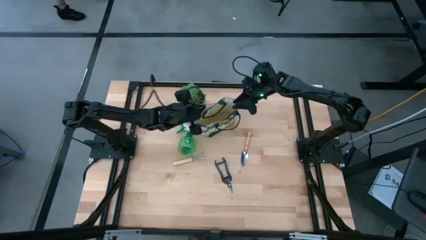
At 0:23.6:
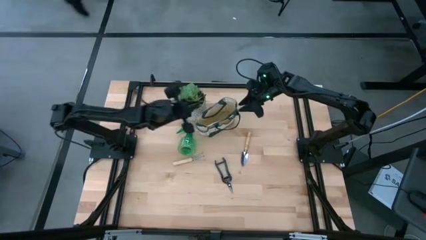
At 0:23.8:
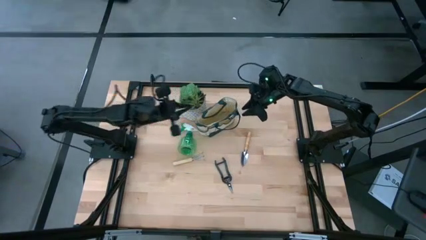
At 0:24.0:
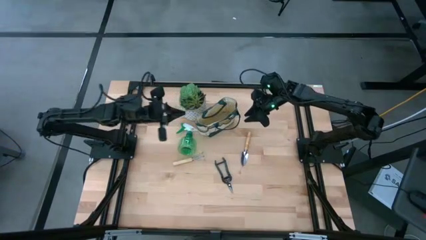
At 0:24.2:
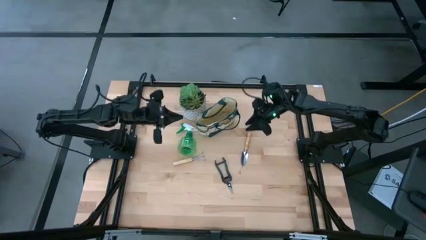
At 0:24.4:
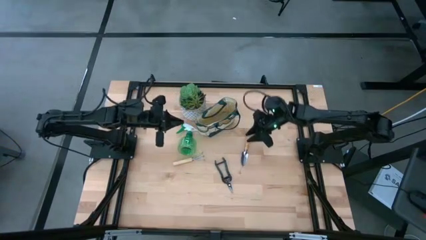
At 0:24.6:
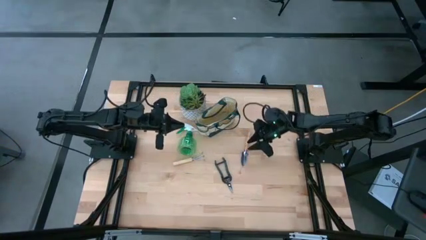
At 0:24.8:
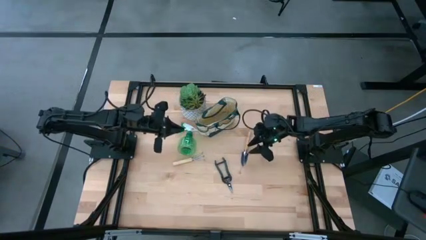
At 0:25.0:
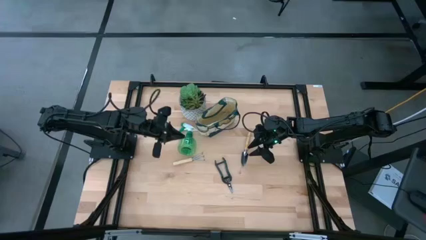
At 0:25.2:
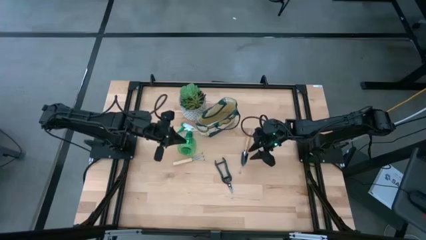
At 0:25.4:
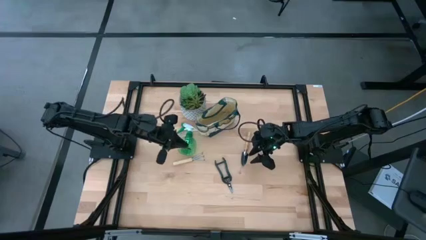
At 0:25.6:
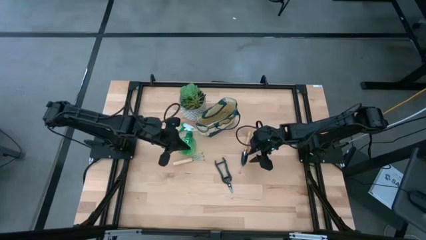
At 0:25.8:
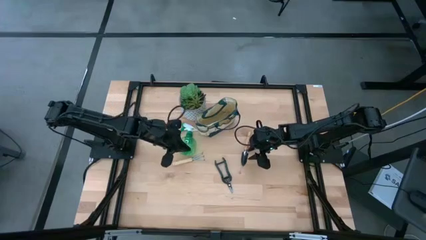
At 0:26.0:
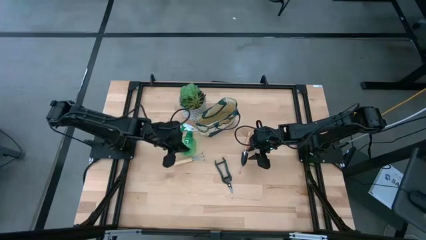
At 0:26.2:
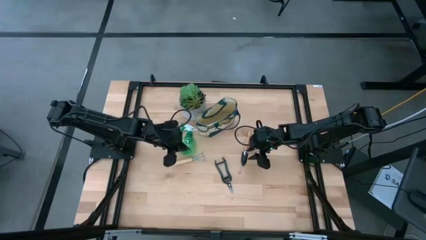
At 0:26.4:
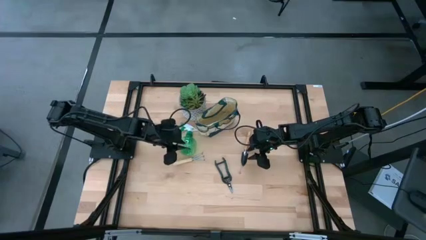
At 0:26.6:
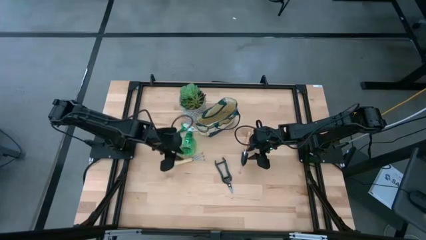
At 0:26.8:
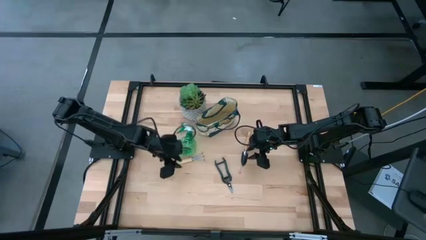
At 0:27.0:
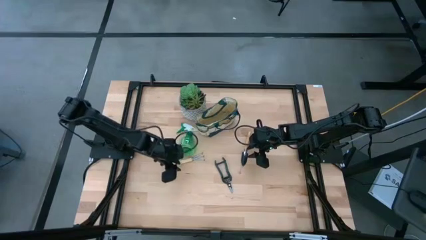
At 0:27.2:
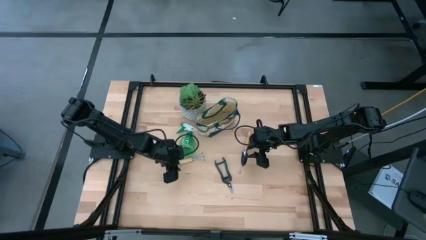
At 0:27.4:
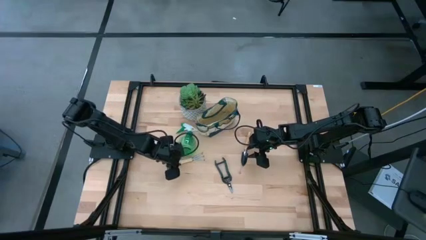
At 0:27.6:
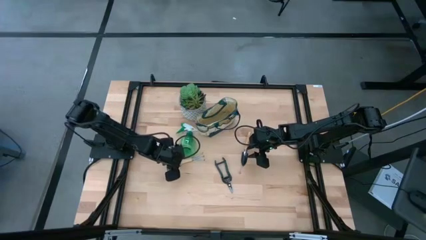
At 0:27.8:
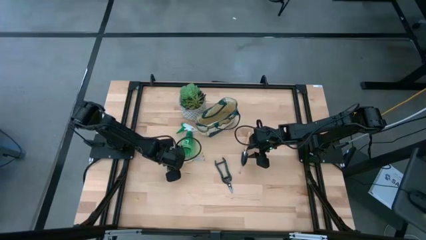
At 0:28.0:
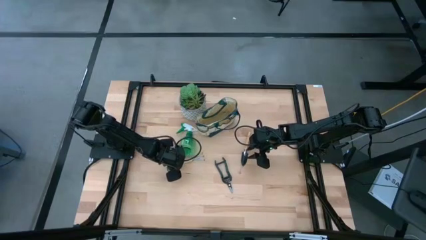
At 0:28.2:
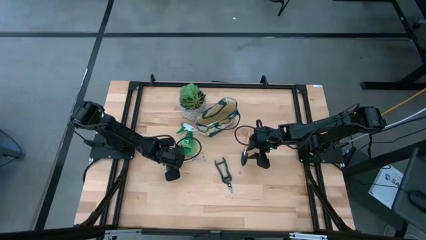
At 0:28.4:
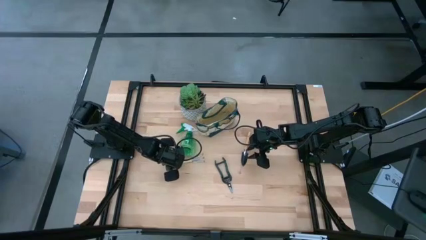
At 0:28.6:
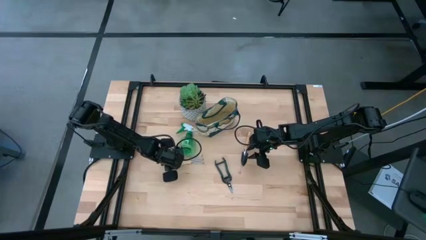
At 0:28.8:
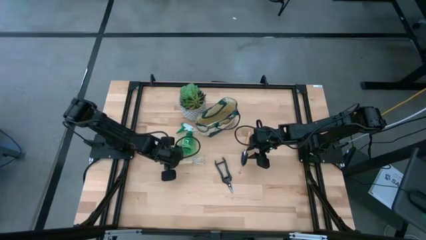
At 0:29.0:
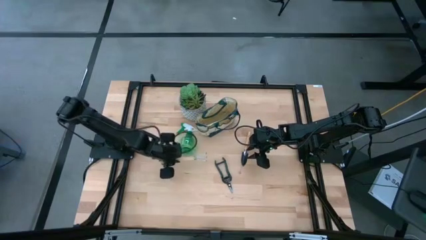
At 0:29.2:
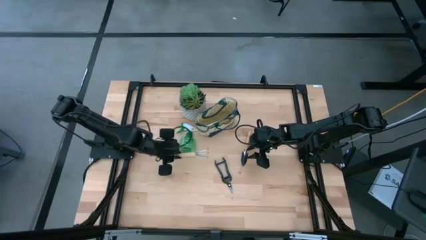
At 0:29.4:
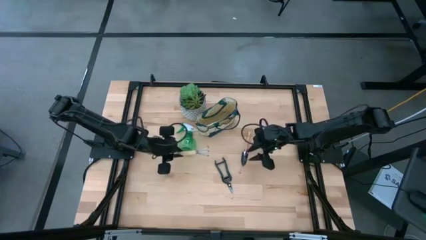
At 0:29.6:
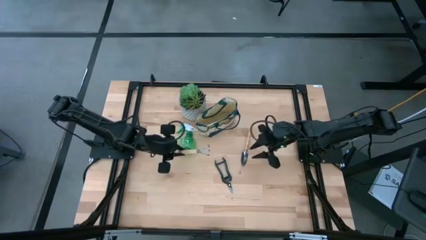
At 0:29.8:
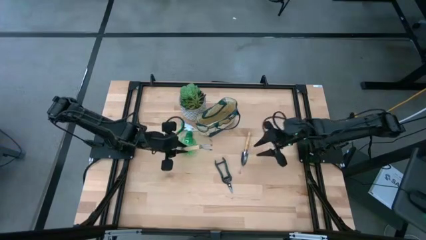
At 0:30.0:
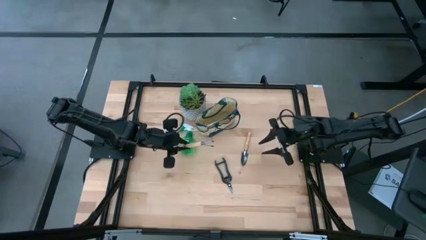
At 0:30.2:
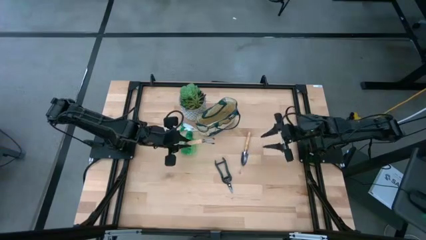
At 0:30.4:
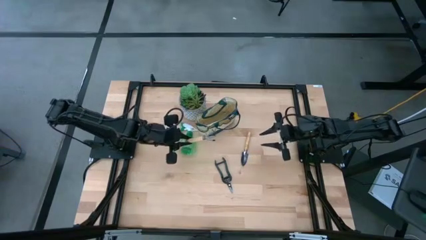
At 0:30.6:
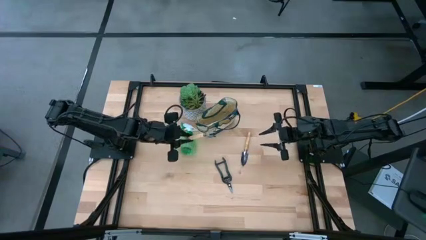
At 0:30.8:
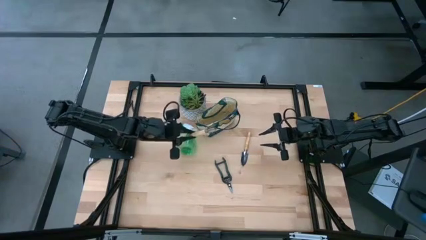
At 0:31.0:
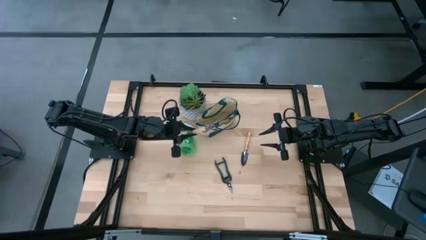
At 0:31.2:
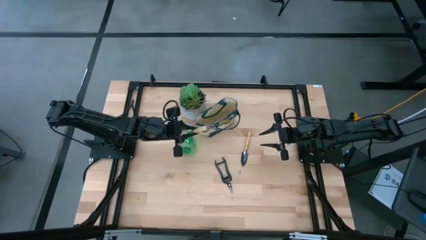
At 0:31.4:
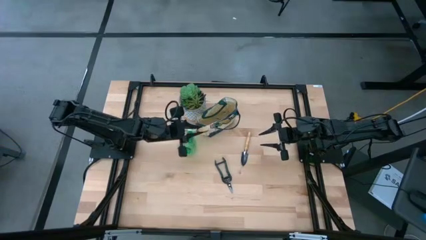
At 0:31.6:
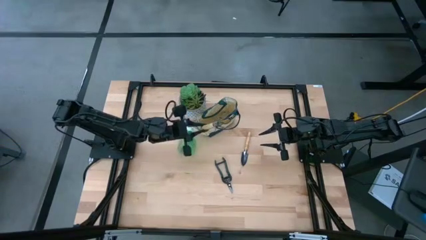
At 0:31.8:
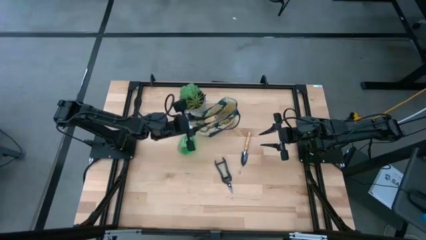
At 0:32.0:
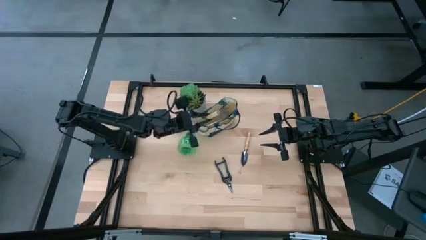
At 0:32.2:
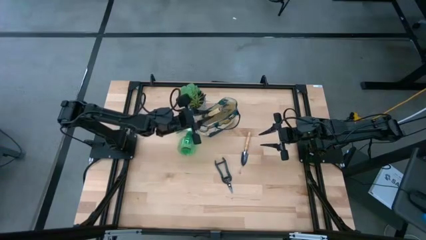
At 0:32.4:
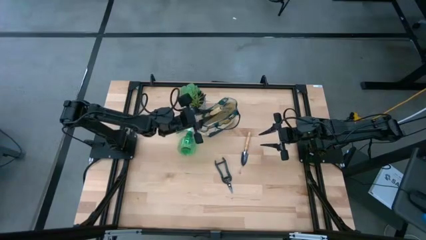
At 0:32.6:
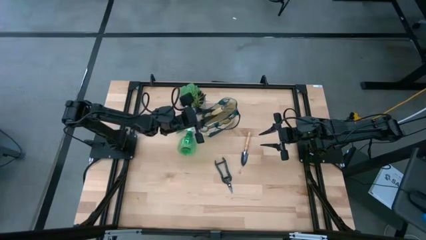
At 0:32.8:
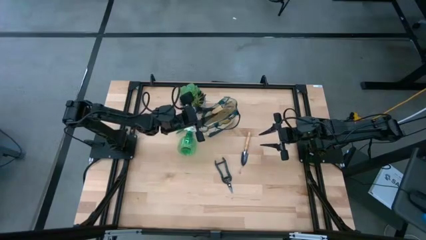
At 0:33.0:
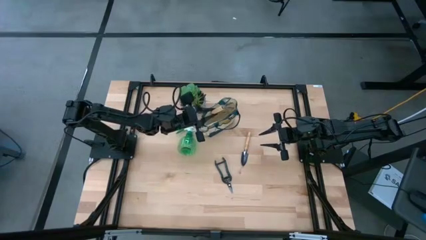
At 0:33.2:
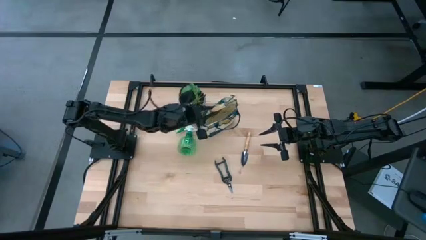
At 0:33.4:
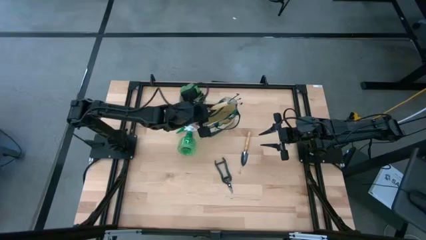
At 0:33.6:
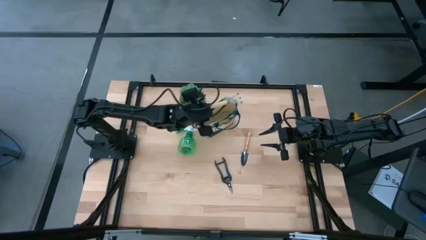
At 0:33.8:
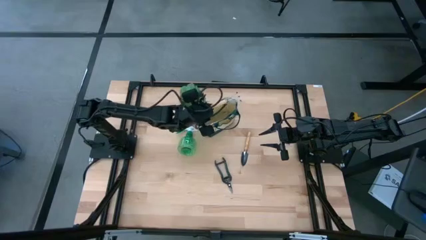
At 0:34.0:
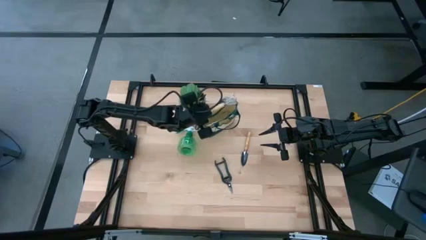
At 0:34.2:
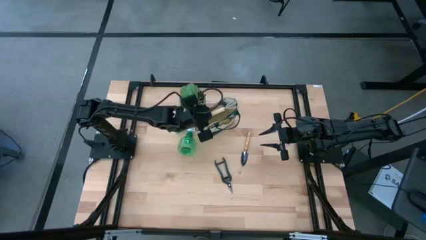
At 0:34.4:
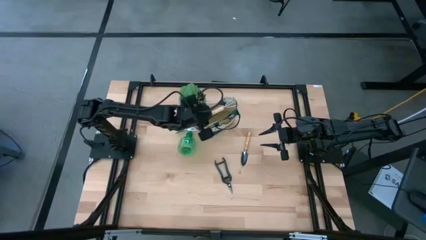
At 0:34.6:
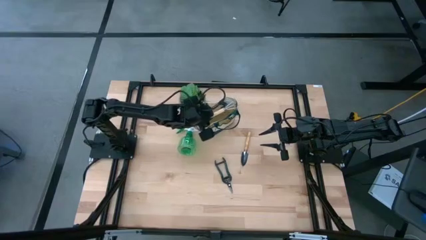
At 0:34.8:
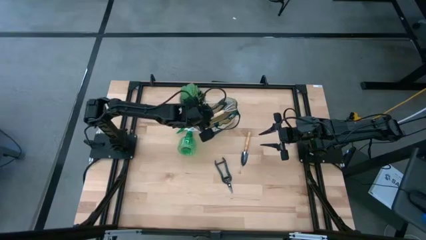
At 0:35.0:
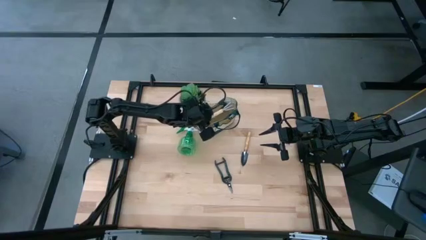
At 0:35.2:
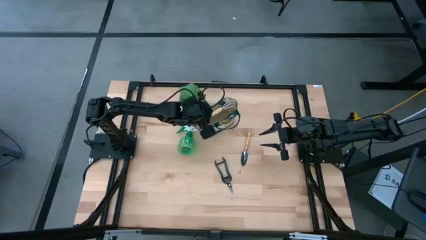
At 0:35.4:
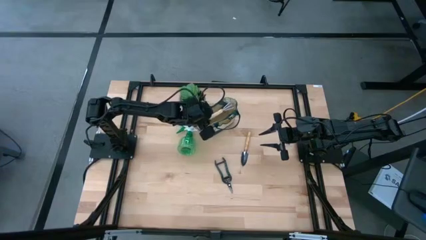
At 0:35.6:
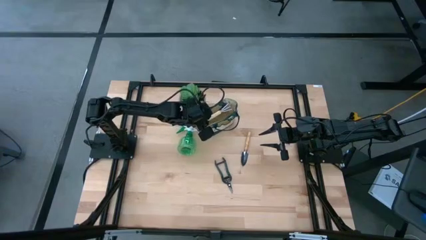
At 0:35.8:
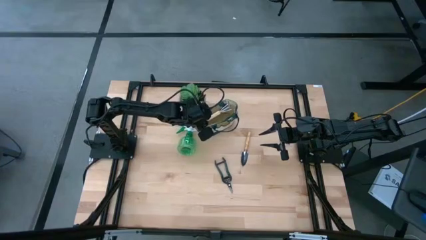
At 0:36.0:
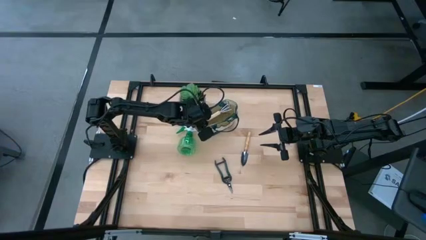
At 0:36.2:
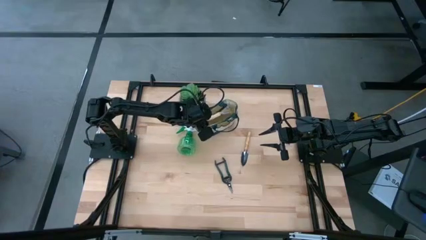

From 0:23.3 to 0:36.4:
Task: Pick & Place Garden tools in Gardening bag
Put the brown hand rake into the white gardening bag
